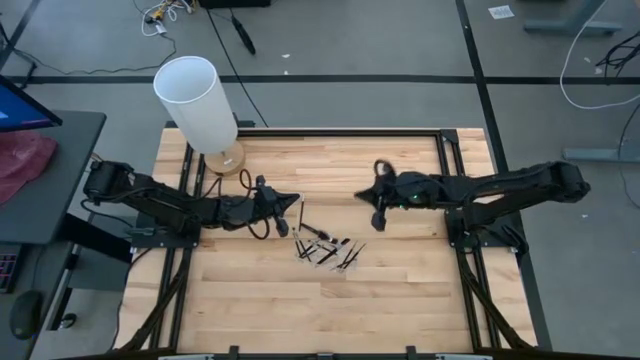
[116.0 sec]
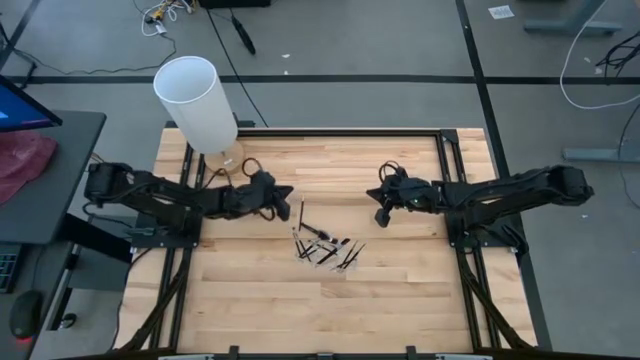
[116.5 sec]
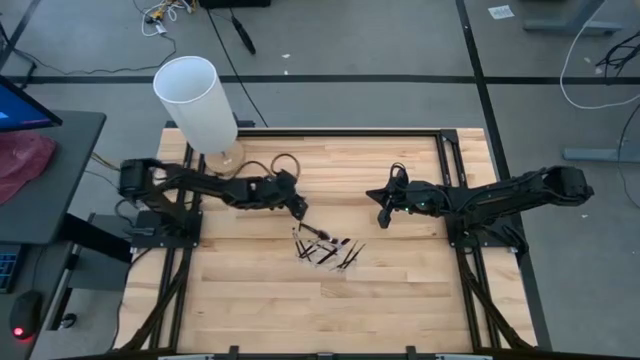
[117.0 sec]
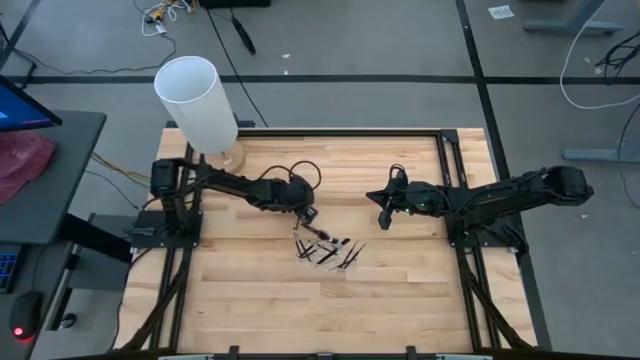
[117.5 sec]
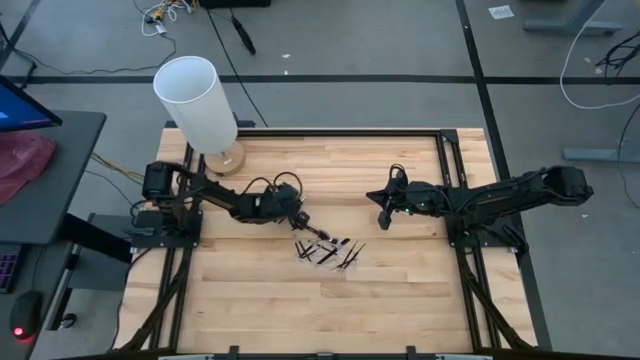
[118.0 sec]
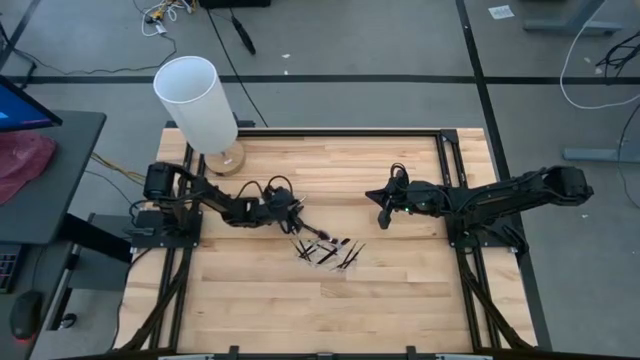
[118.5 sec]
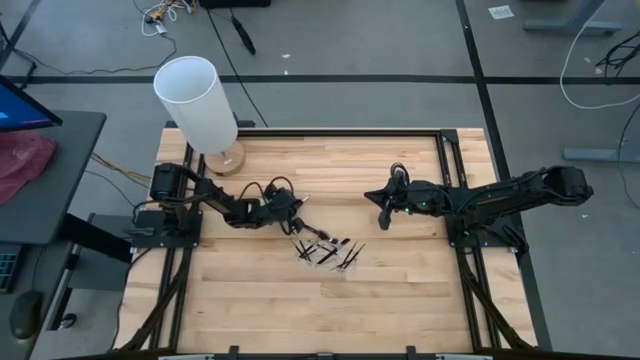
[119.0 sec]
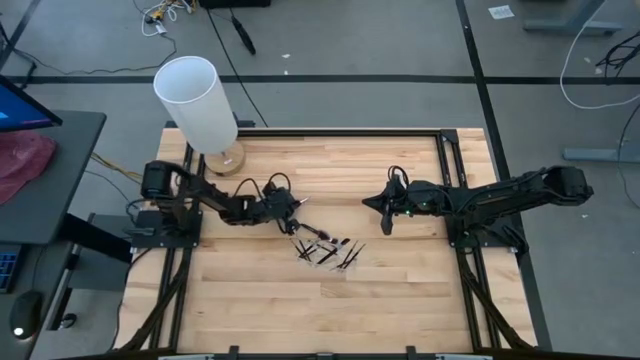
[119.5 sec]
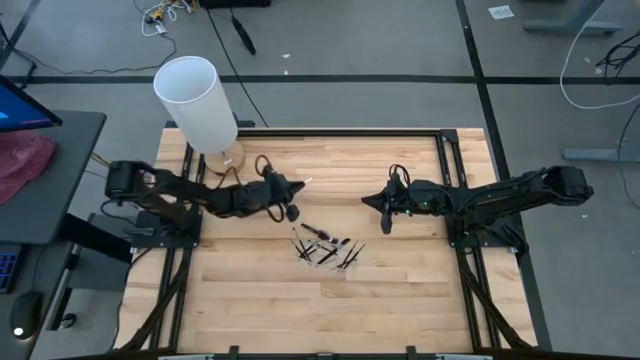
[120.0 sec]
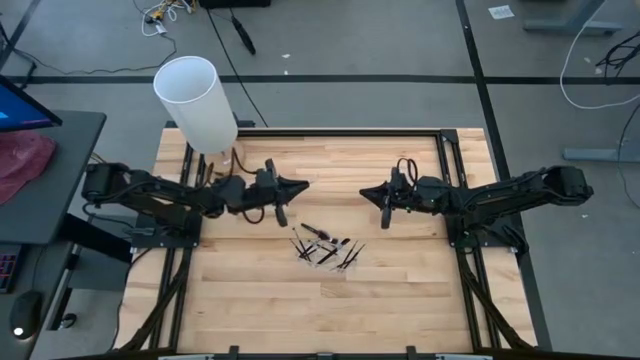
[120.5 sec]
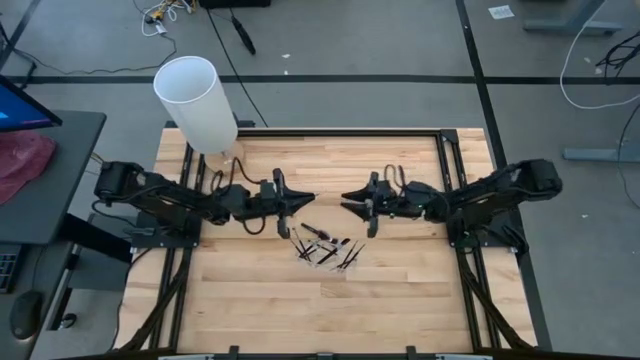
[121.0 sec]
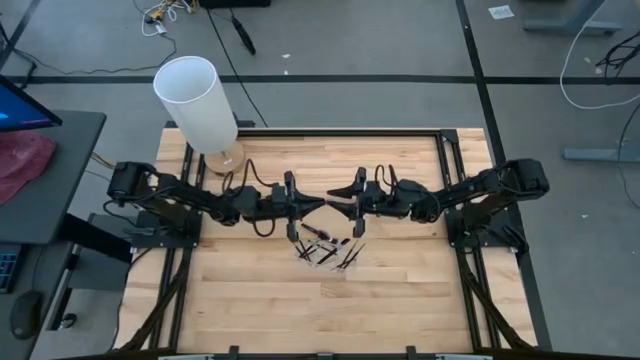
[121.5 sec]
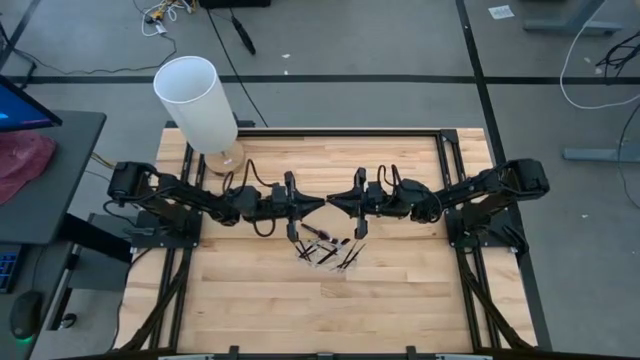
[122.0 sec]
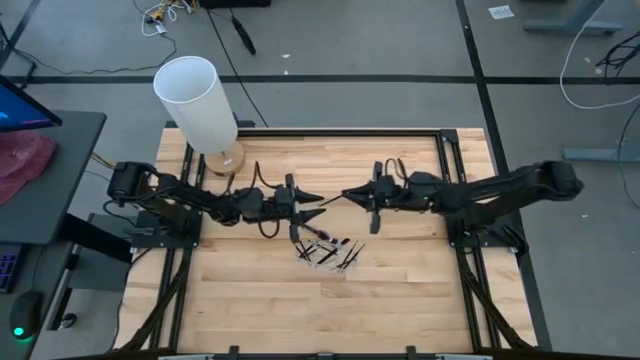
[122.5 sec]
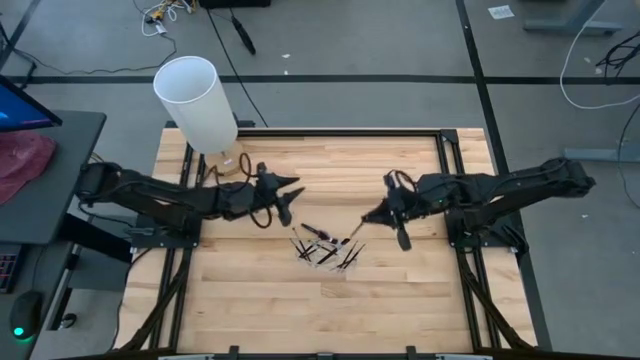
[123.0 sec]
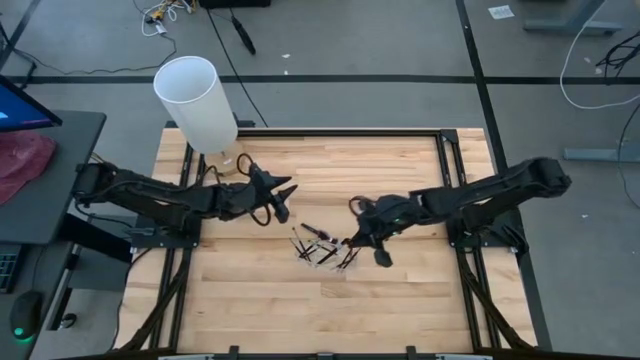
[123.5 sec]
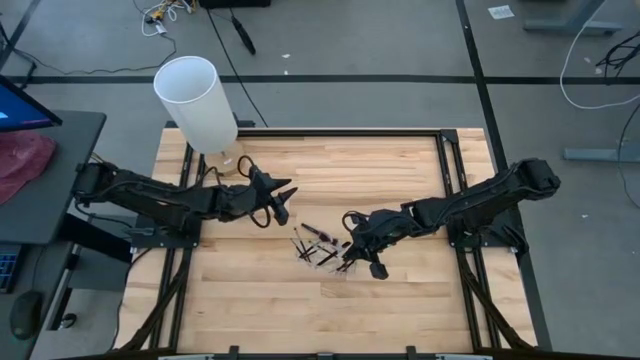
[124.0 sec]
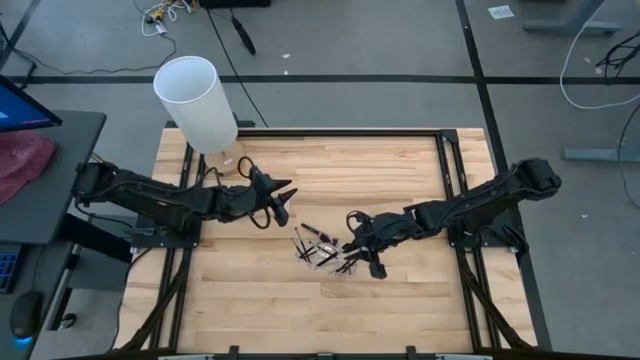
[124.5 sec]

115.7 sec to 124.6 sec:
Task: Put items in baskets/containers
Put the black liner brush into the transparent organizer

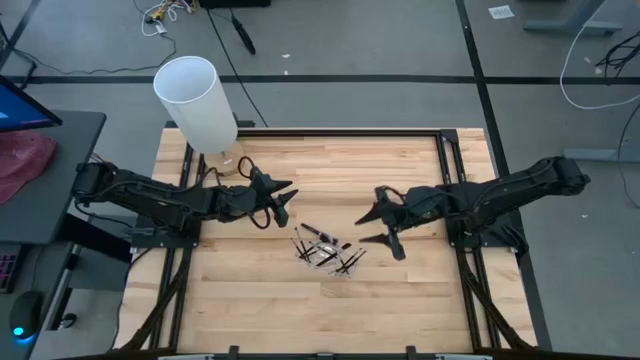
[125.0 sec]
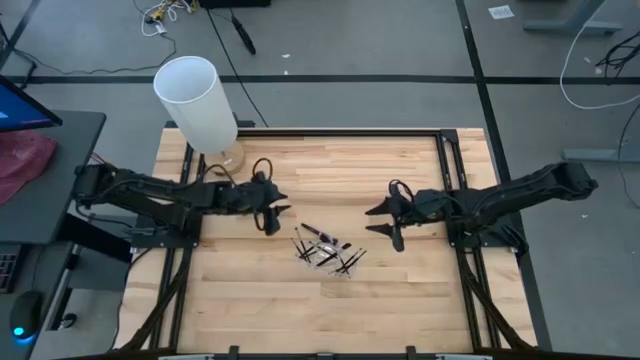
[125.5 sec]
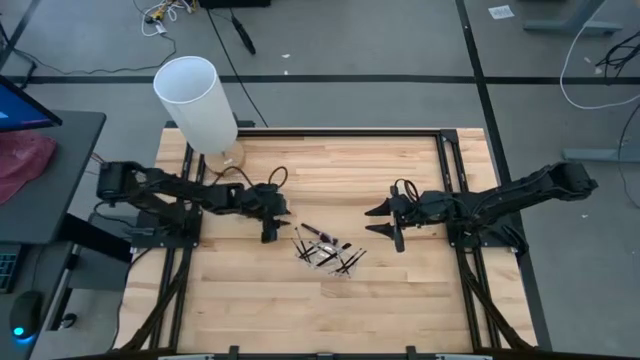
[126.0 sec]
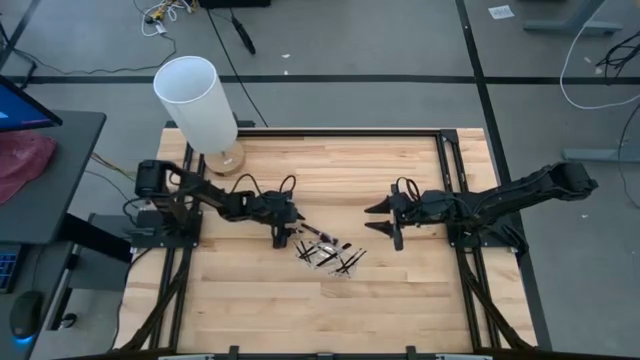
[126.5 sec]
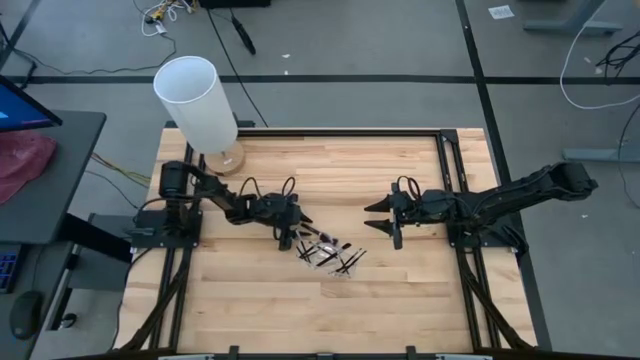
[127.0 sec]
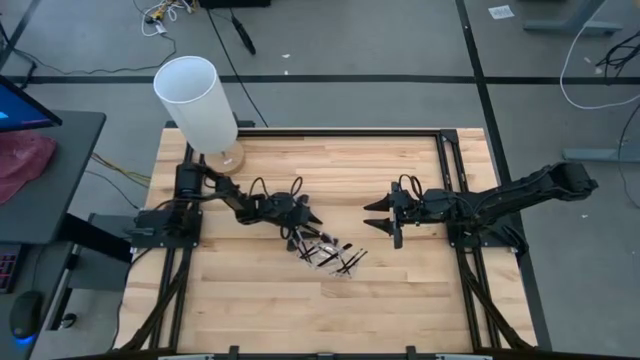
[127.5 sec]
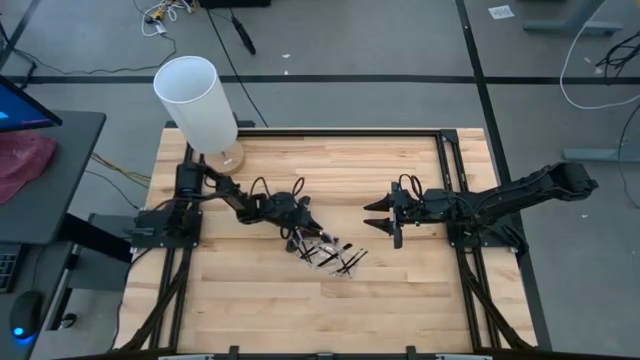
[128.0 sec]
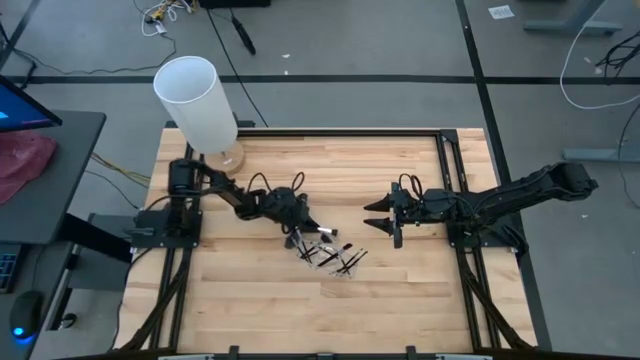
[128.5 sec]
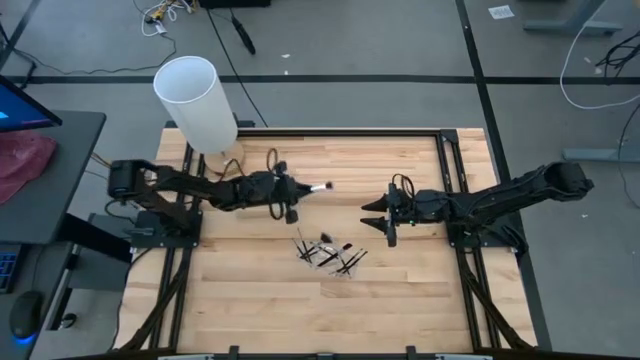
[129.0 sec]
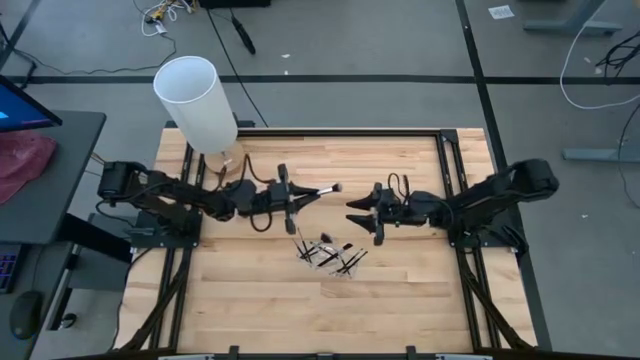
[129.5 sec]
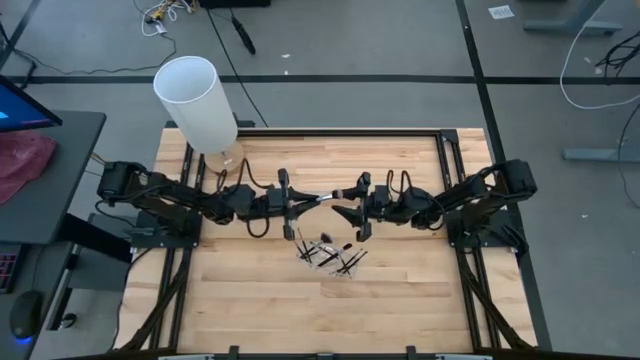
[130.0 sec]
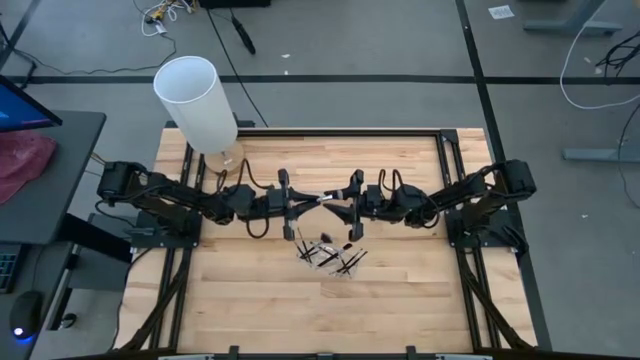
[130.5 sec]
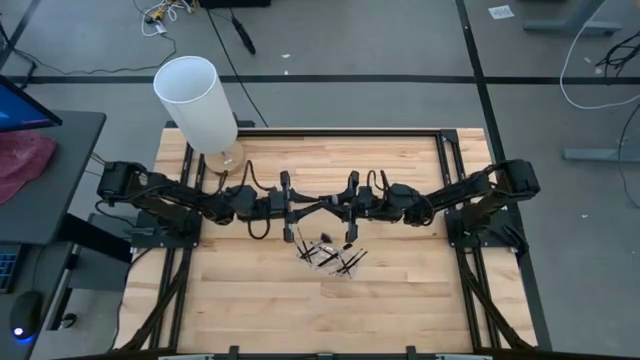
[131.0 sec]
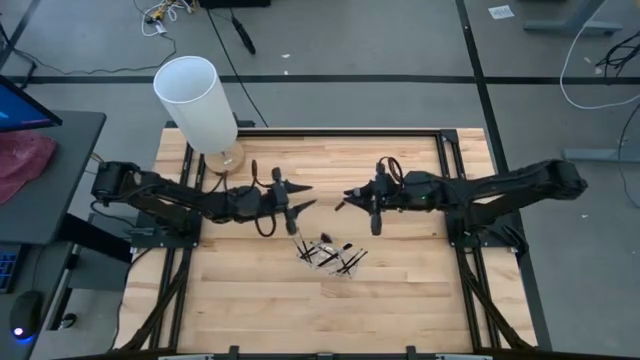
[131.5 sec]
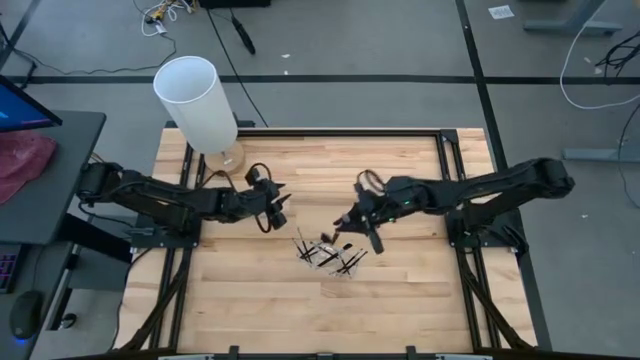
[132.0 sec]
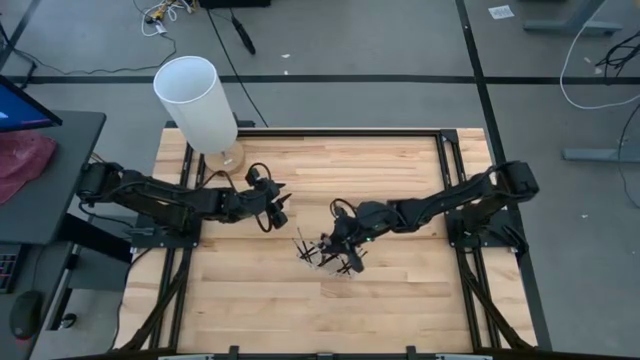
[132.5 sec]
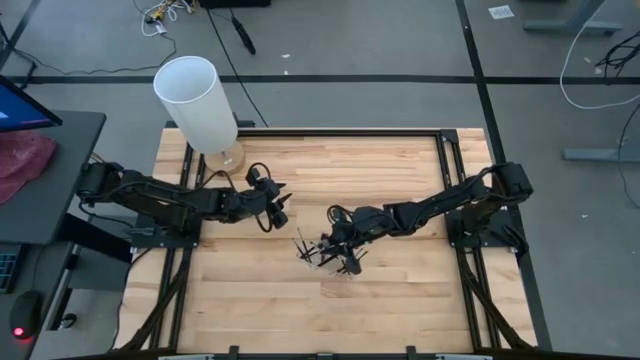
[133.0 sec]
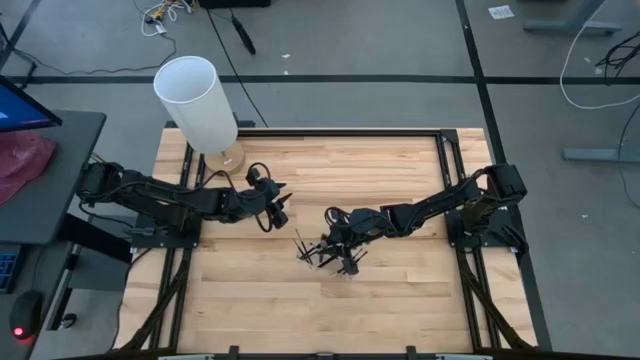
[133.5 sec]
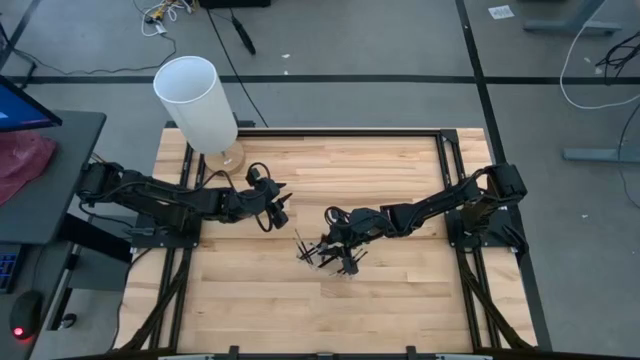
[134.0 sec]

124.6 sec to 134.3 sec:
Put the black powder brush into the transparent organizer

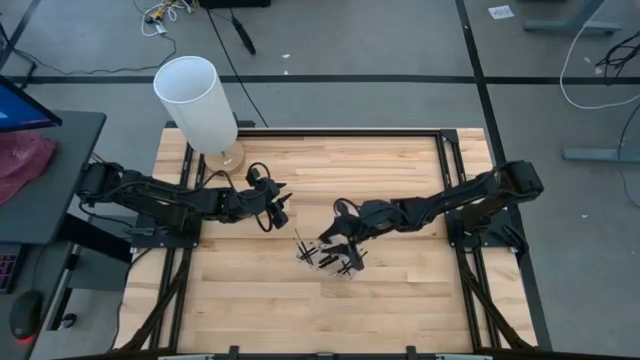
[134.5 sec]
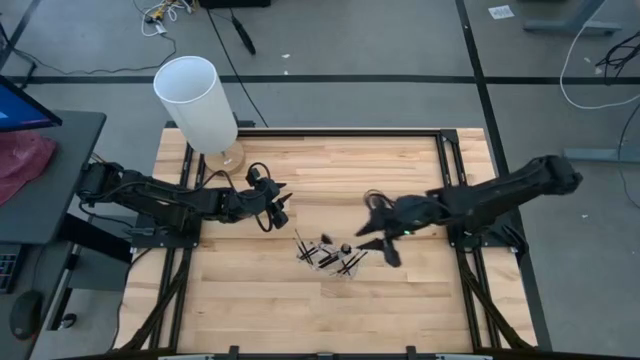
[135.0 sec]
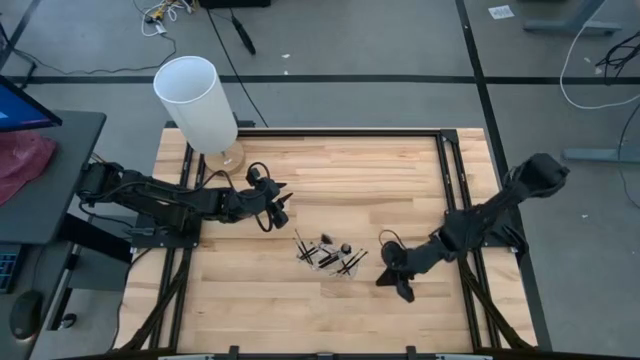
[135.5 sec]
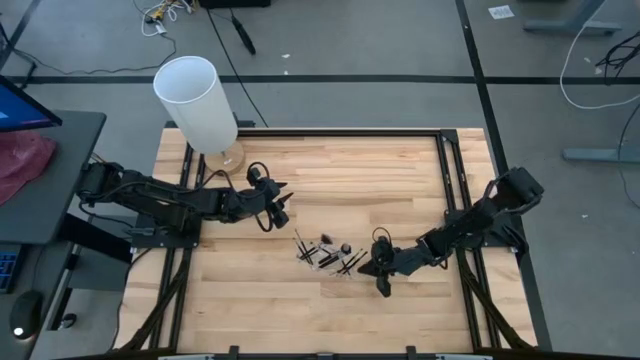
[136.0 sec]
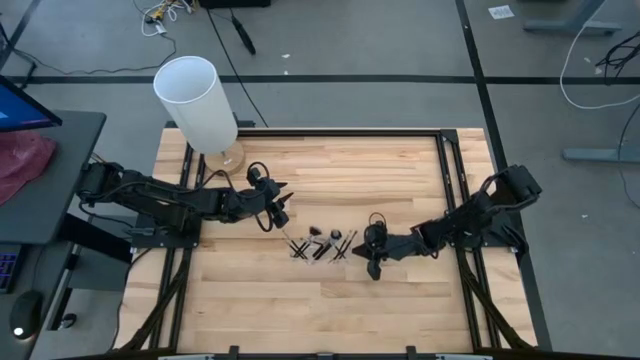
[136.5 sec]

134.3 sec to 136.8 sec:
Adjust the transparent organizer
